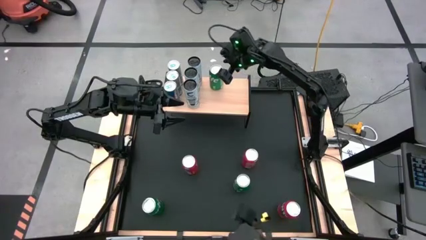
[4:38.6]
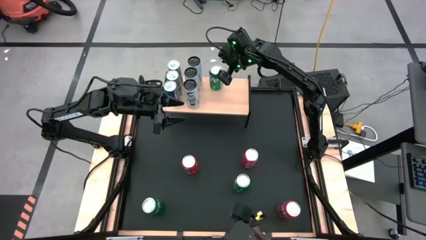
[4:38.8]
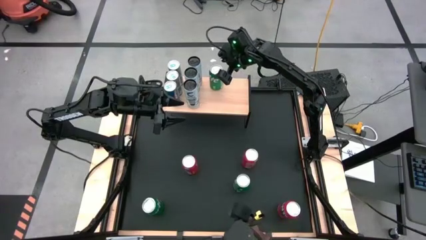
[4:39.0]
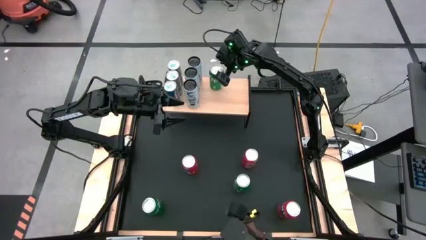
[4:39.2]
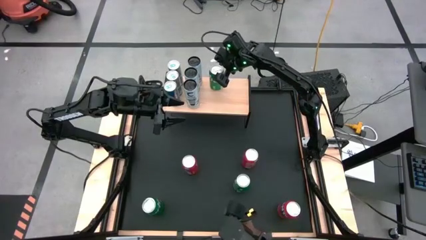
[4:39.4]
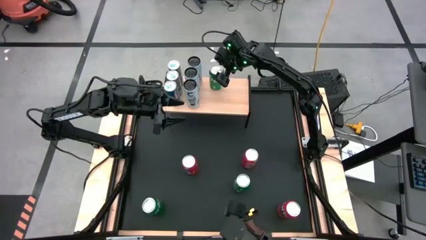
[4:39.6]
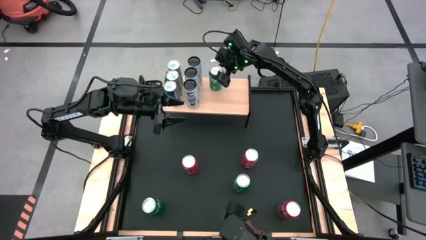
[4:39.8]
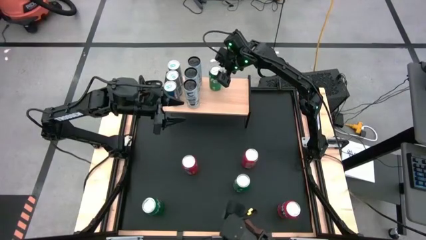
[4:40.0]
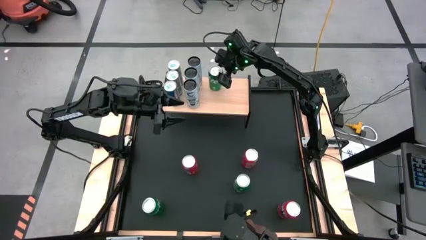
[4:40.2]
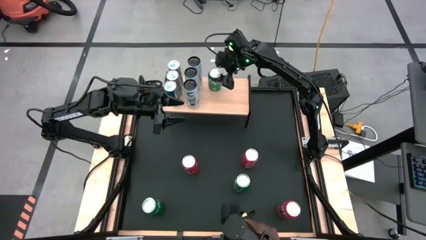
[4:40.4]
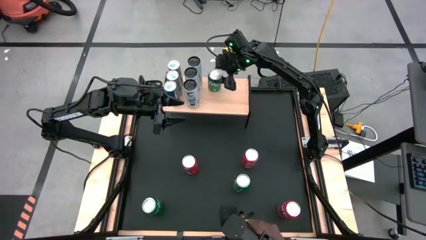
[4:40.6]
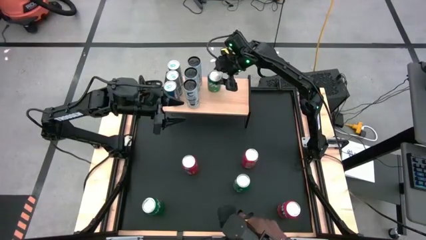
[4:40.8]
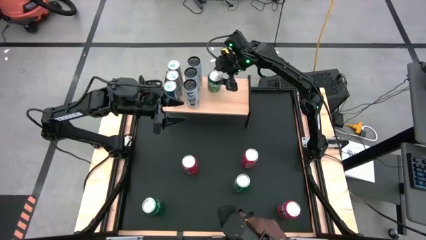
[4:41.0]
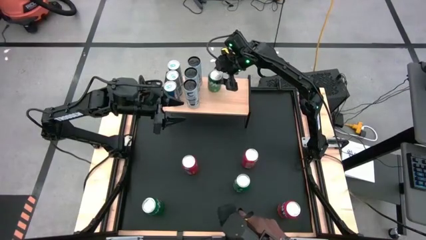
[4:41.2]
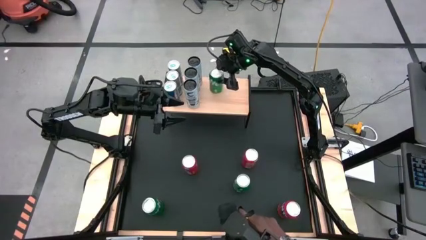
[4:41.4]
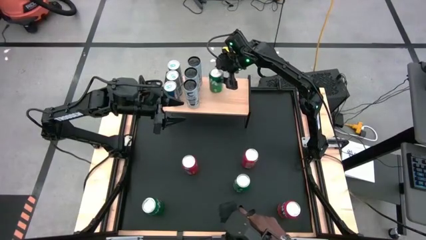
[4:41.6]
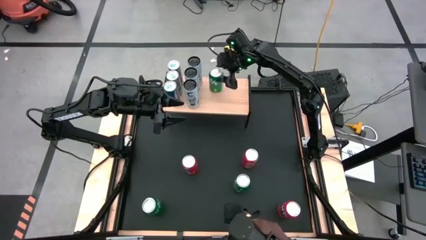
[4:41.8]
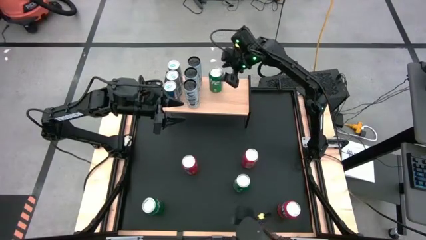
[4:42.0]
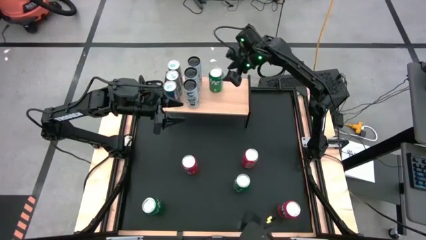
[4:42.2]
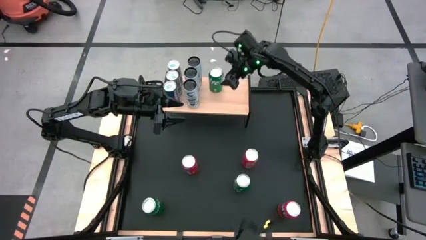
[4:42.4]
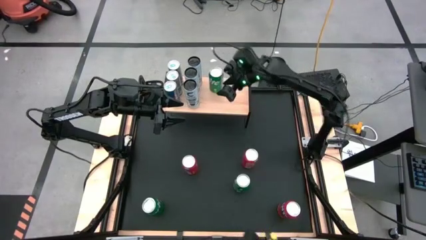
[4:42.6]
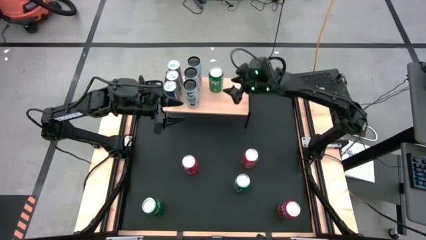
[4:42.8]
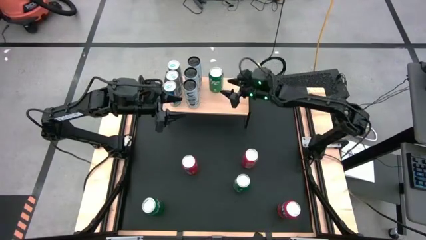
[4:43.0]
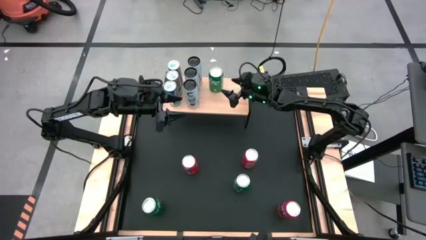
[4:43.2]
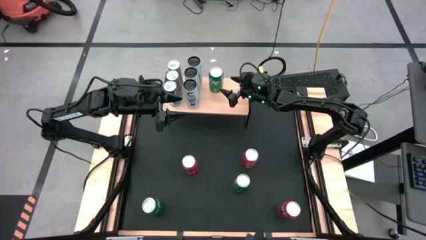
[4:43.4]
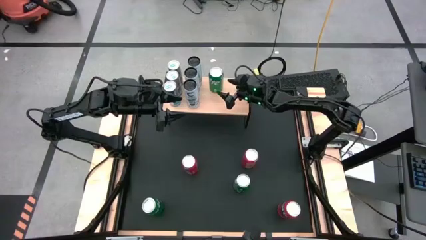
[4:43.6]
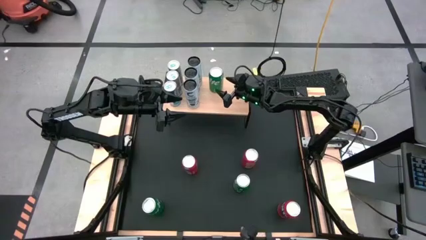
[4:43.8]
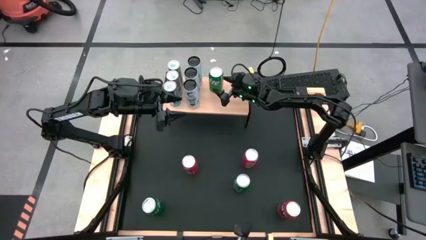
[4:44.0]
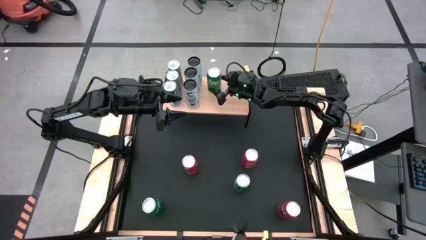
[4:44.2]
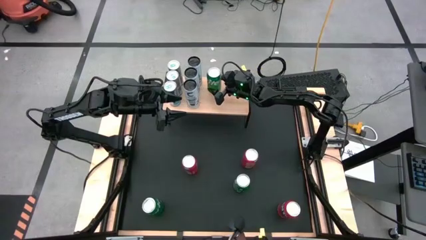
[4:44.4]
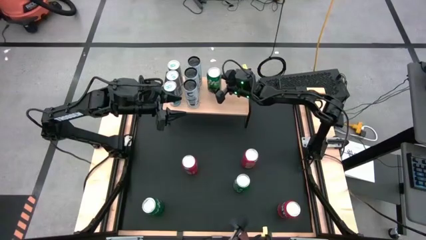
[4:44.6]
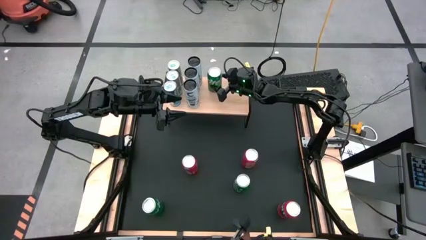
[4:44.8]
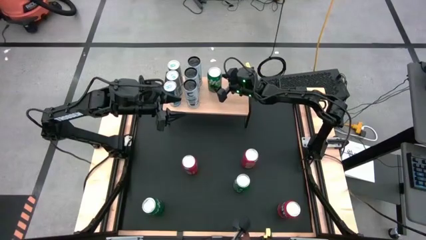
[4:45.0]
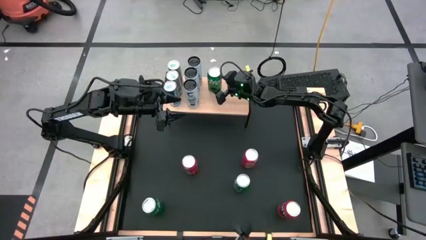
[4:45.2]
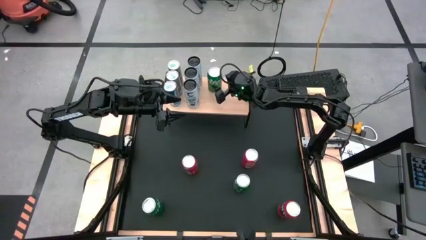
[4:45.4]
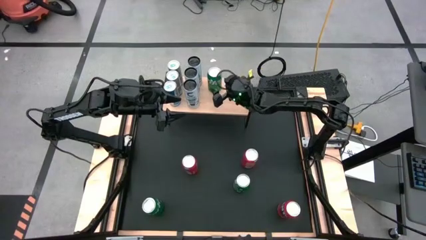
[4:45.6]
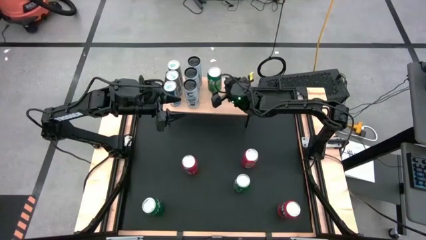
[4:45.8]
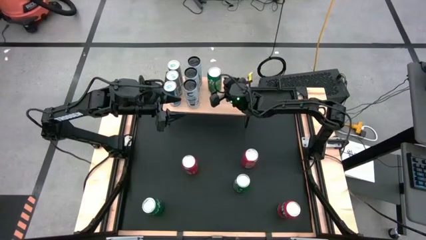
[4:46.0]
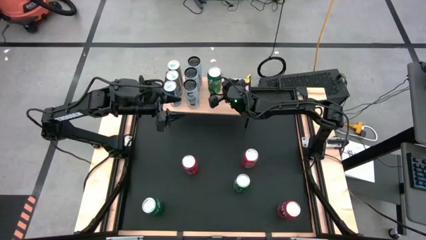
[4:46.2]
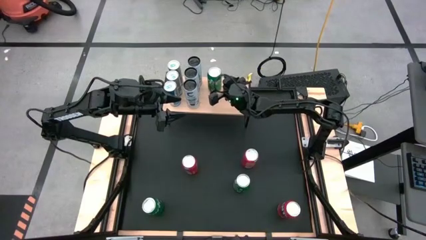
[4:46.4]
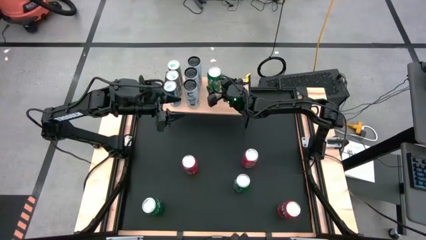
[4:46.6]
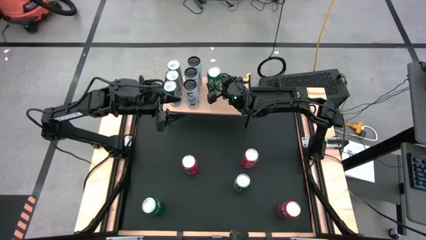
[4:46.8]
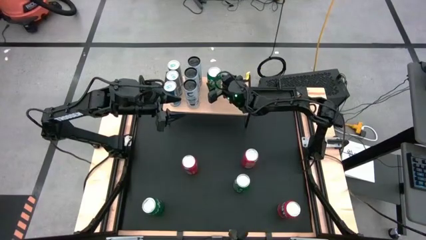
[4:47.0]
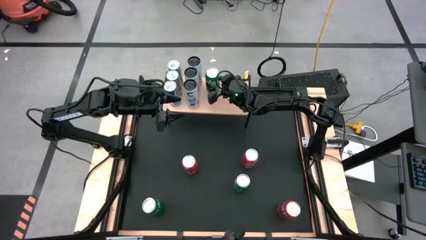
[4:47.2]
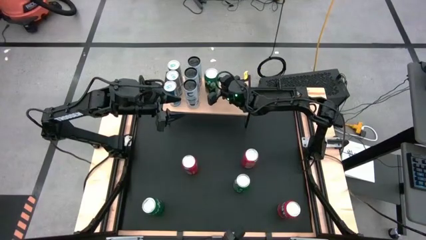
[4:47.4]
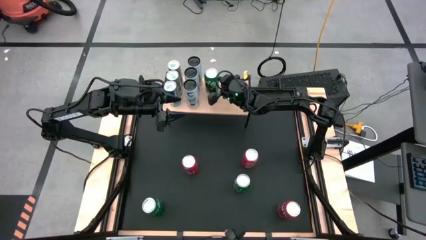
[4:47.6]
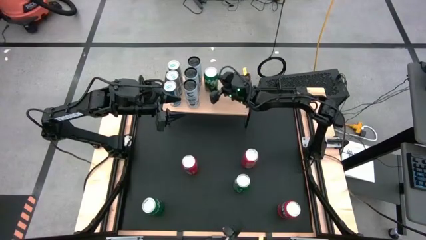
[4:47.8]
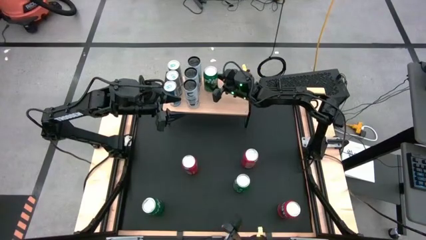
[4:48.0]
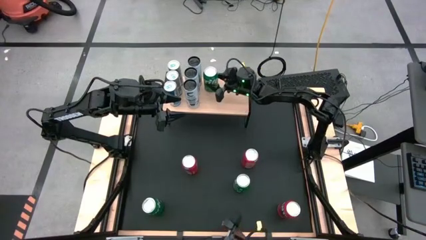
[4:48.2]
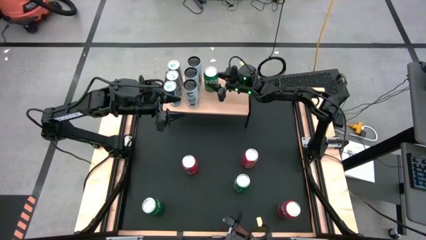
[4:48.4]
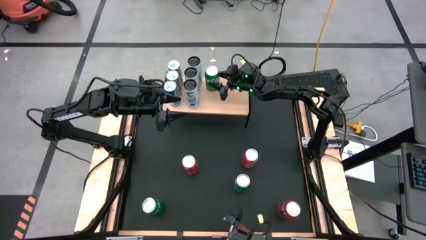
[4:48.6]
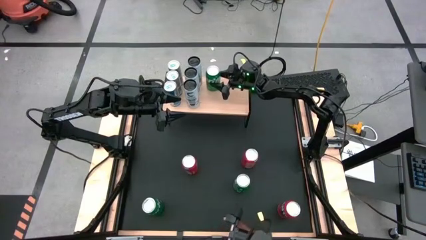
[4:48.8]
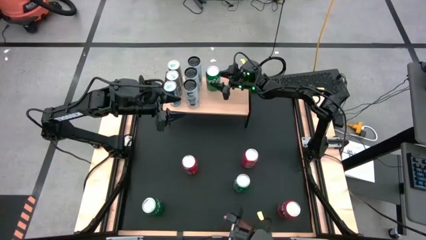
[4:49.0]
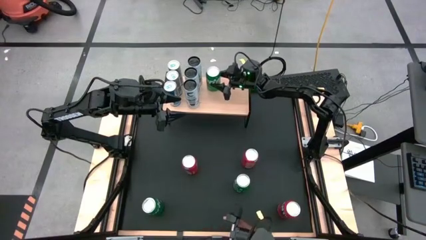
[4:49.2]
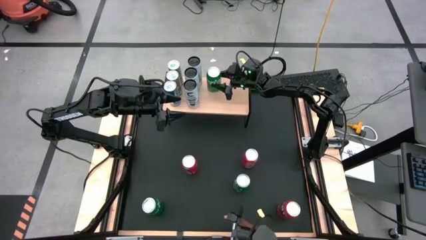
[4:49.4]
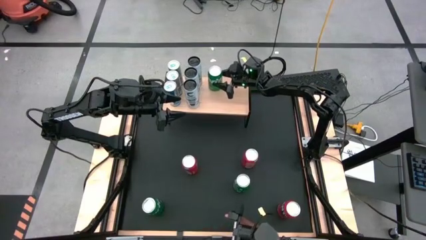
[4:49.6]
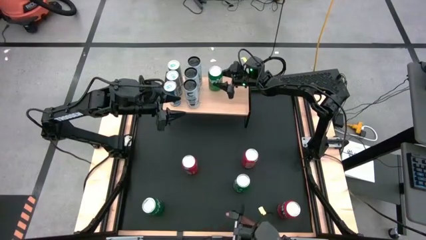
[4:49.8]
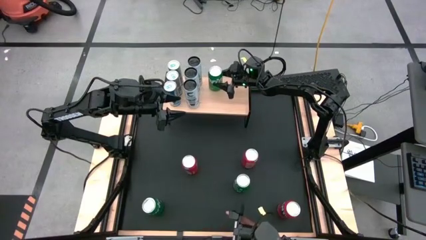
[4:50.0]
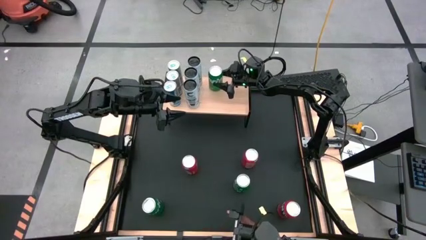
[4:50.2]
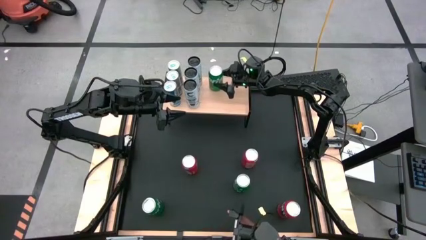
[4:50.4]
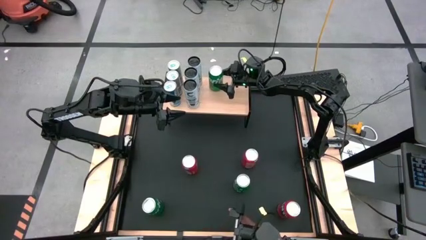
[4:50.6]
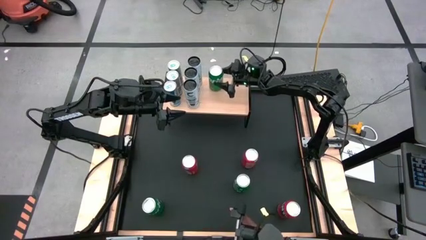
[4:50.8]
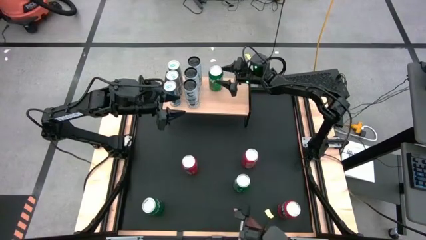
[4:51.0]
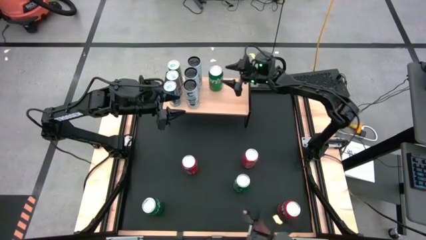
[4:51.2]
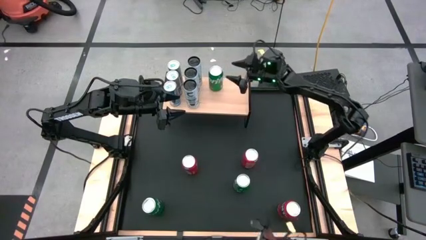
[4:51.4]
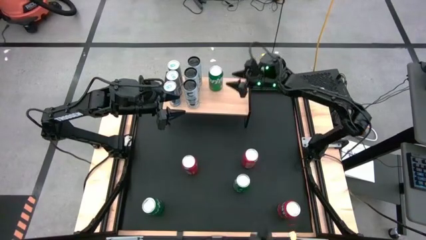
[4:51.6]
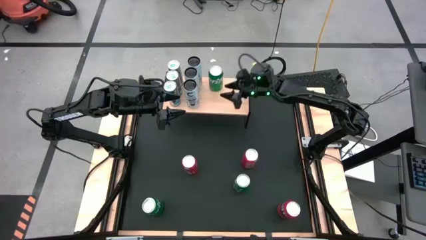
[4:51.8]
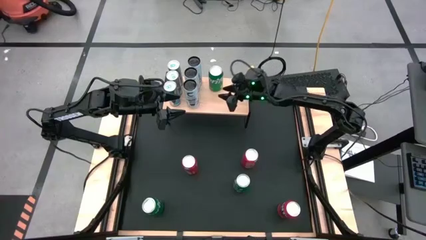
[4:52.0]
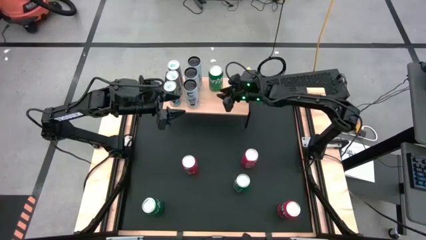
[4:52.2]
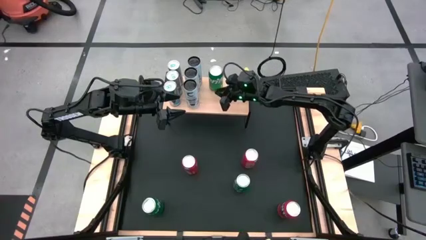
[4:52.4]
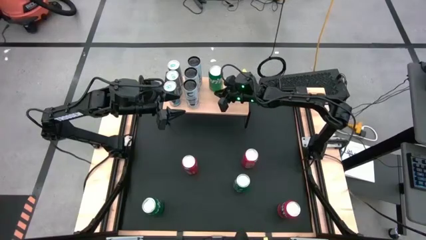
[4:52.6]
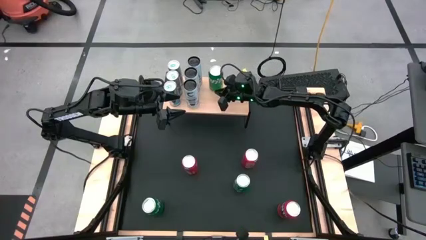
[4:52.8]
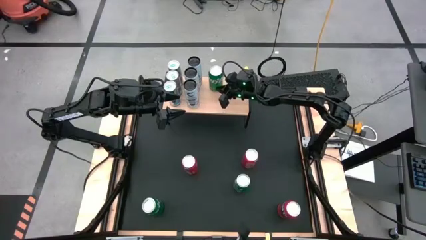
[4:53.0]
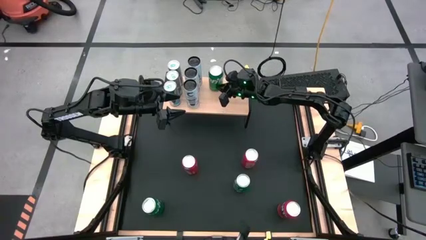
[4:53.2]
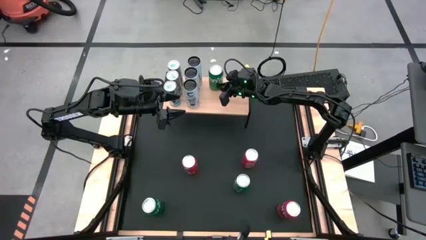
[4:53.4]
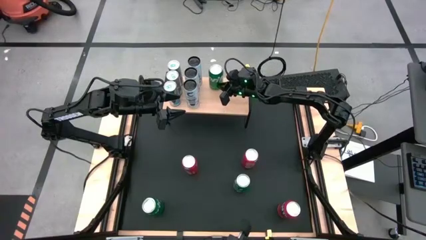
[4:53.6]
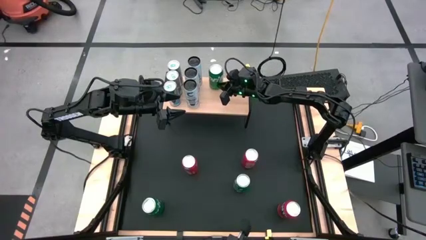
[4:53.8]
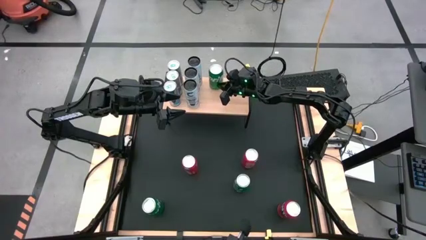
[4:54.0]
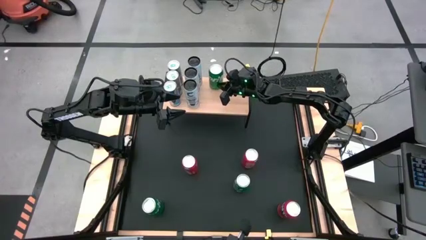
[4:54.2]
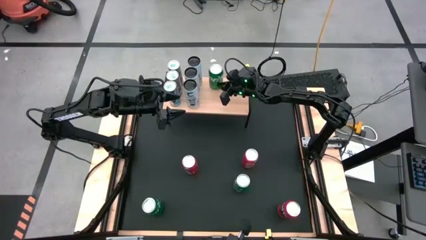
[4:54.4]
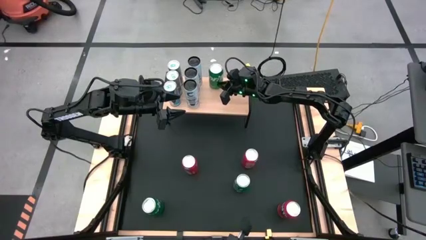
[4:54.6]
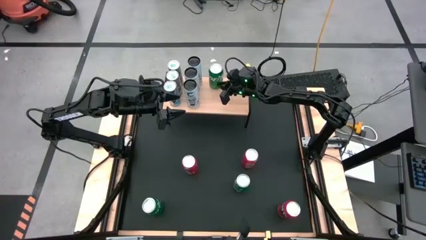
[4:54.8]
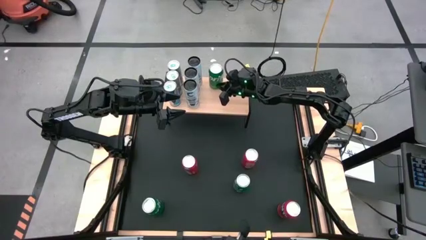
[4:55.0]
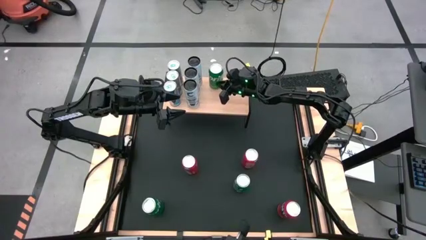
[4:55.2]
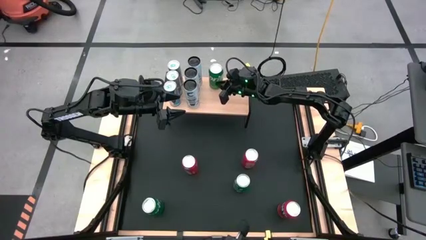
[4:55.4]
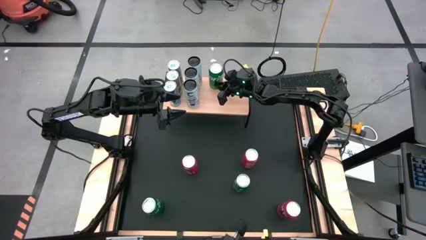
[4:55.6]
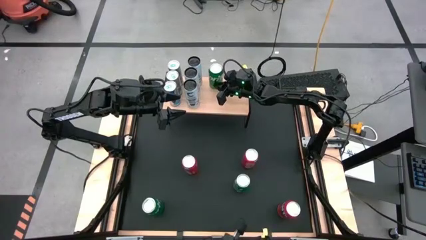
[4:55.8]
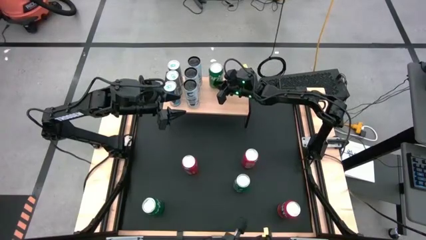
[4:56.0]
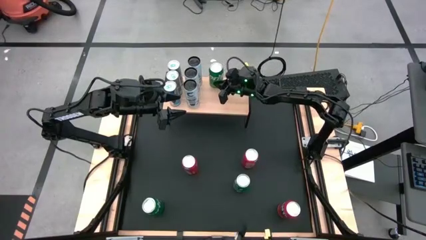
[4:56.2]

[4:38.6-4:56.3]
Task: Place canned beverage on shelf
Put the top green soda can on the shelf
